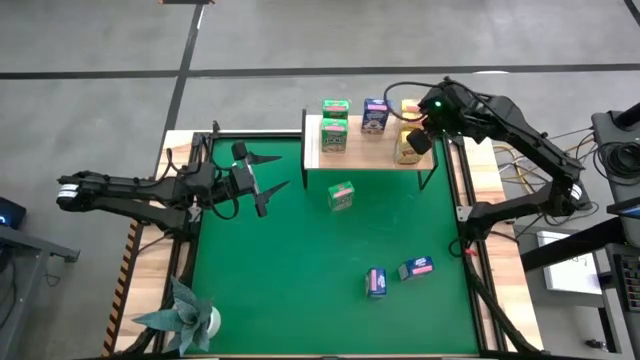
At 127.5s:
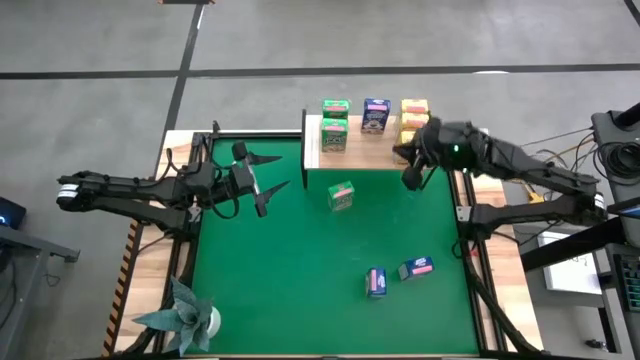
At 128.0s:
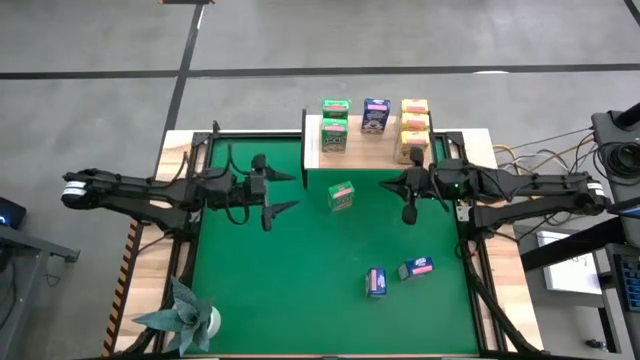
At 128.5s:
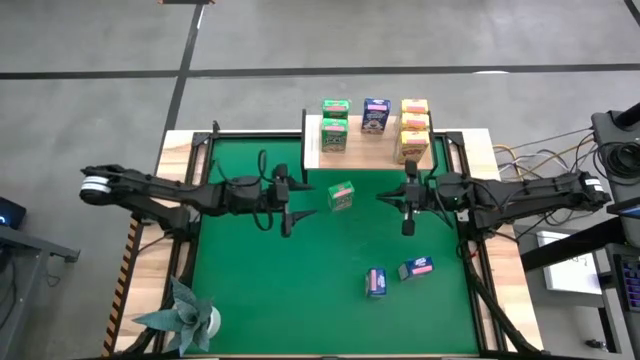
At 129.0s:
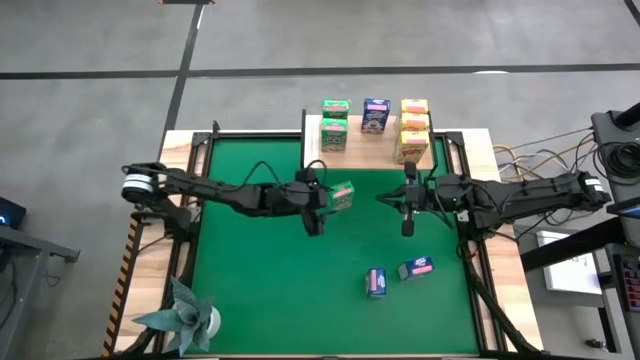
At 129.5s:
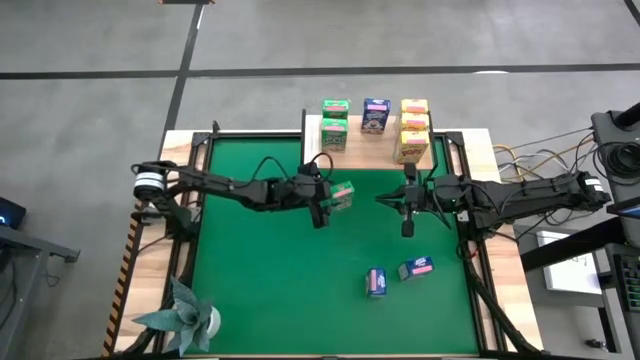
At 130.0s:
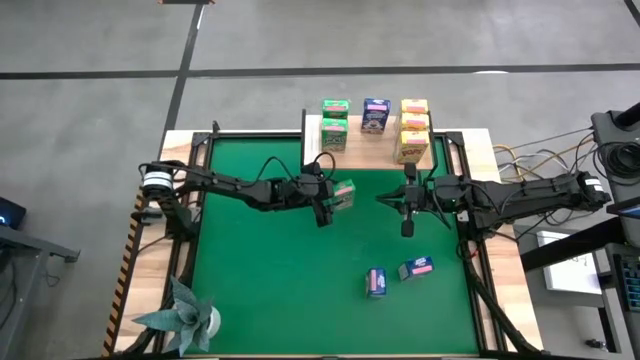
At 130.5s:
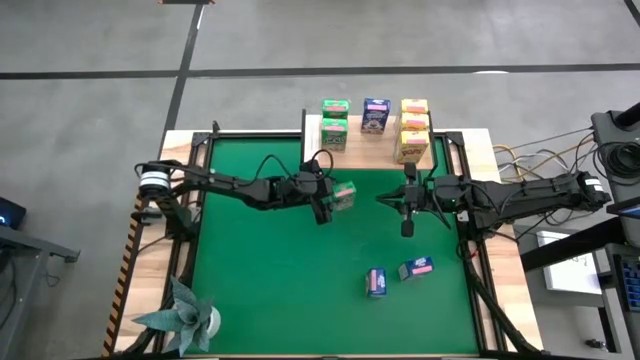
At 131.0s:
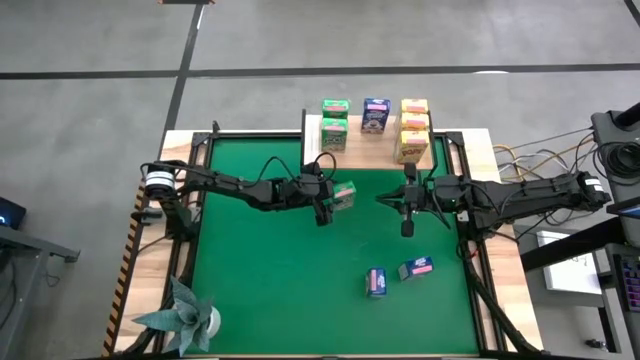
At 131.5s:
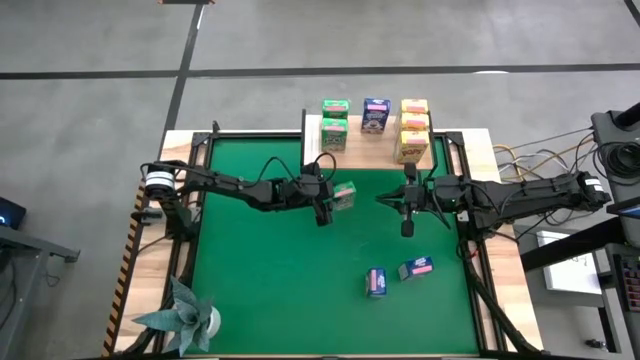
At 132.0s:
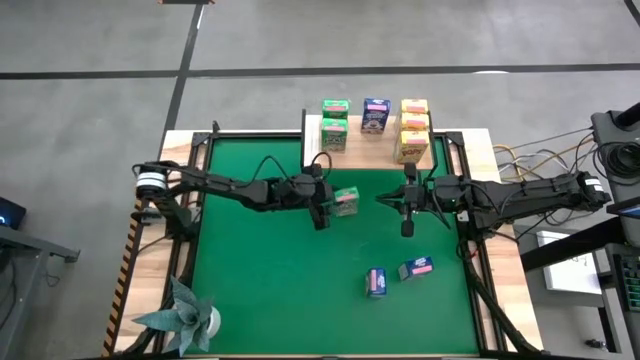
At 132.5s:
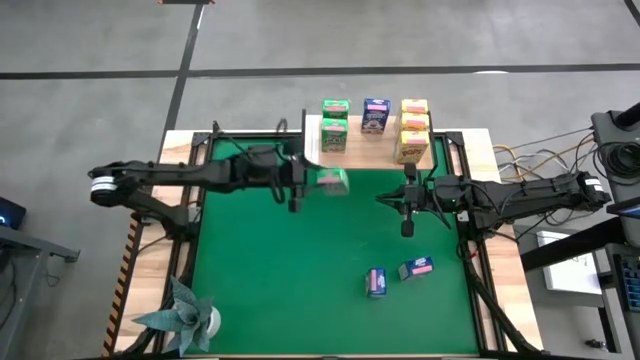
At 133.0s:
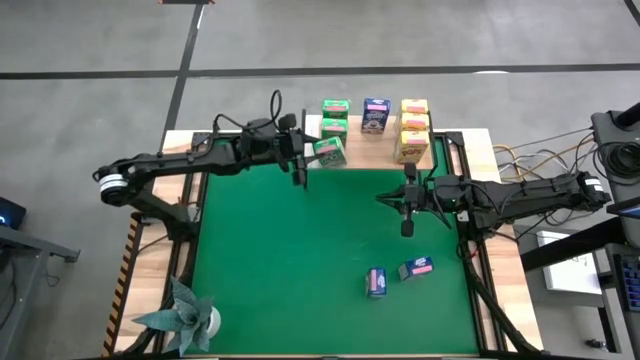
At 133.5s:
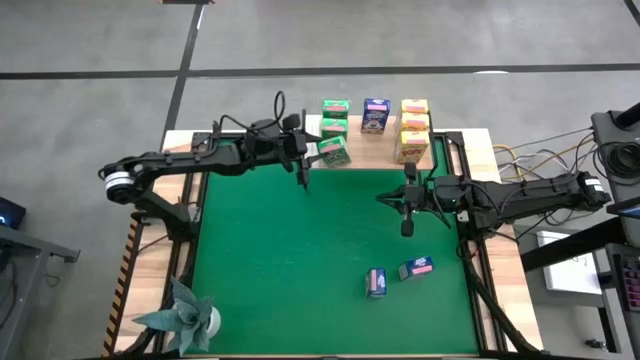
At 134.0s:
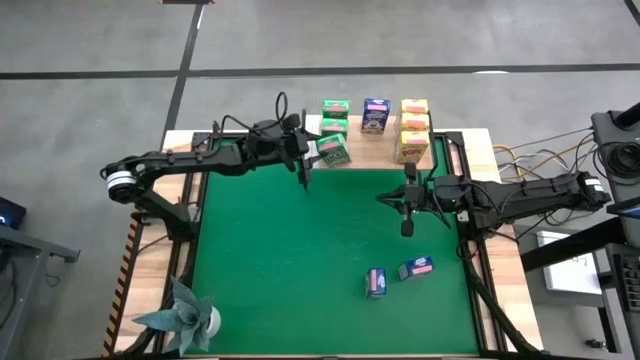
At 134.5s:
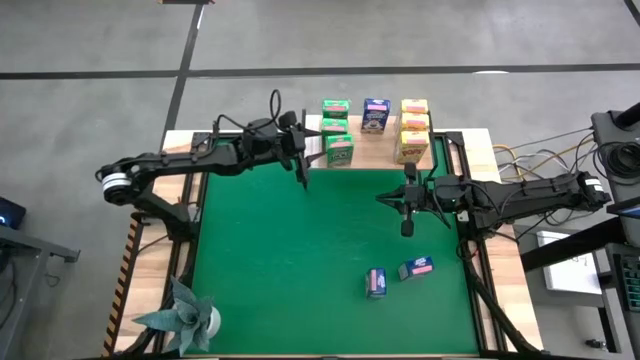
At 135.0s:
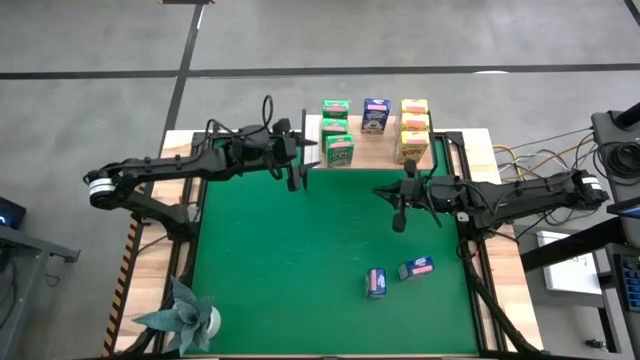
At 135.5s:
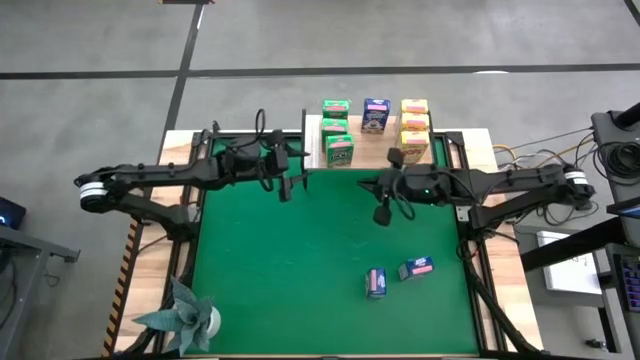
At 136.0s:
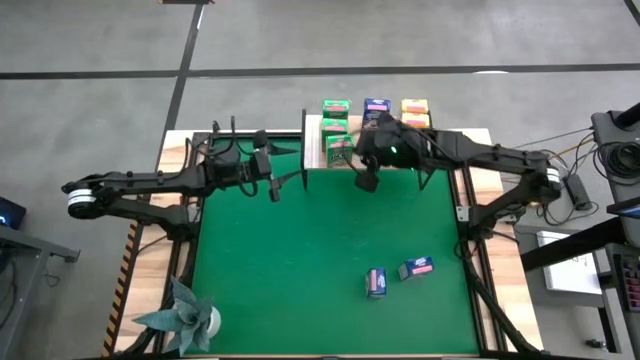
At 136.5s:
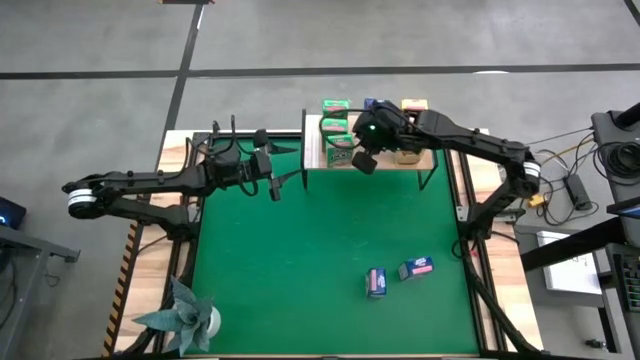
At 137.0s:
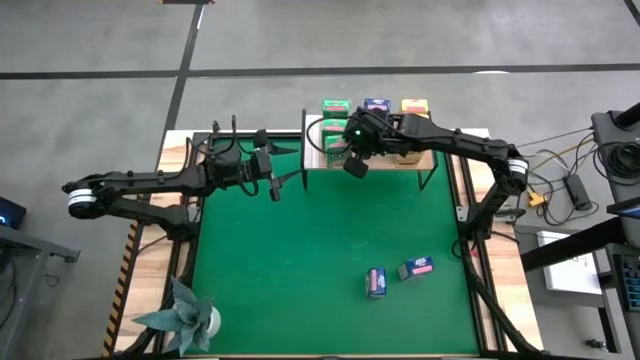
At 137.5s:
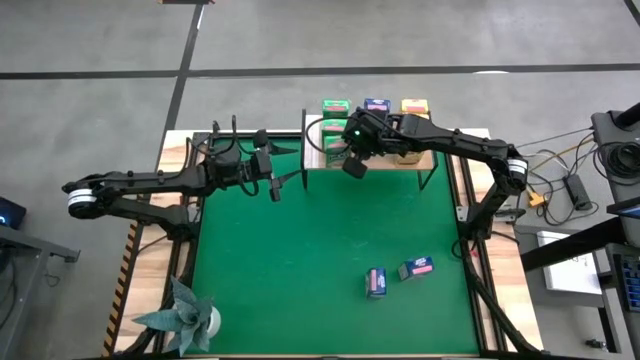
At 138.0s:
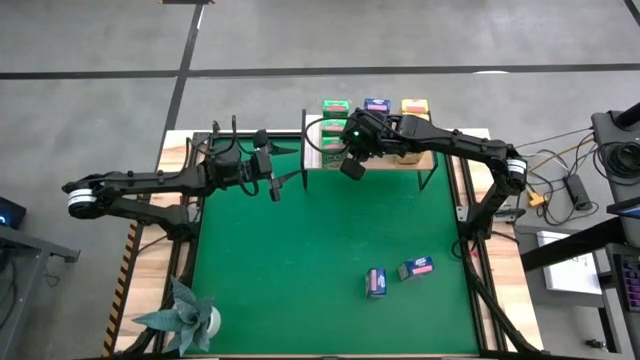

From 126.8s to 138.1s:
Task: Stack cereal on shelf
Put the green cereal box on the shelf aligned with the other green cereal box

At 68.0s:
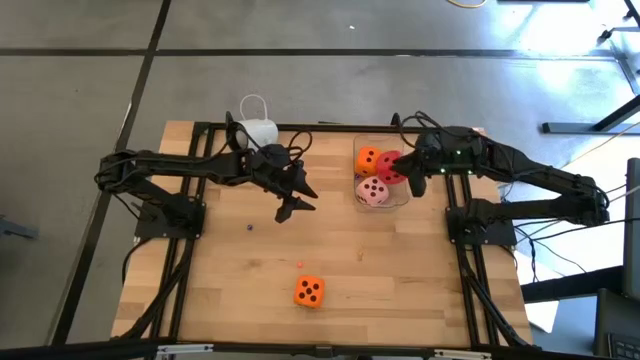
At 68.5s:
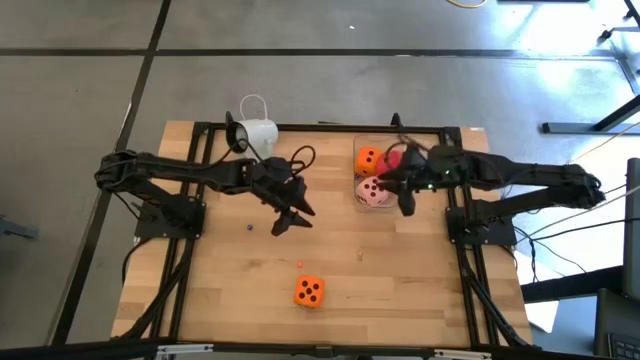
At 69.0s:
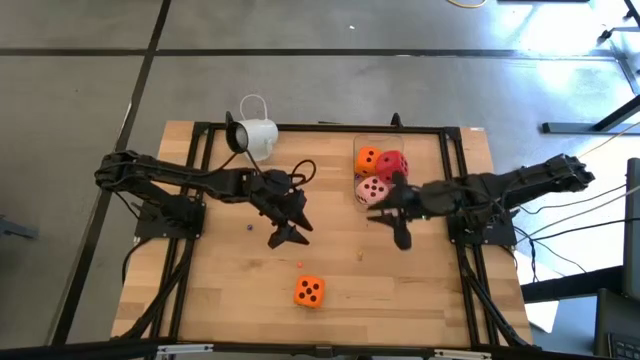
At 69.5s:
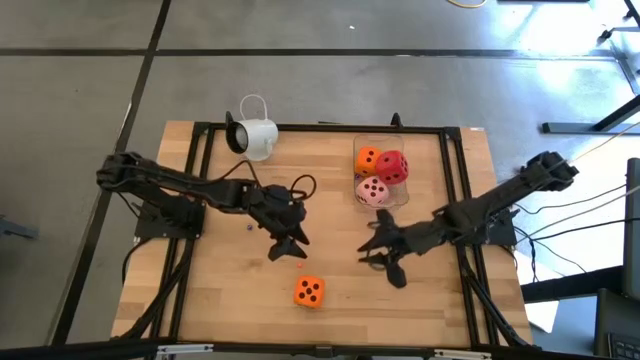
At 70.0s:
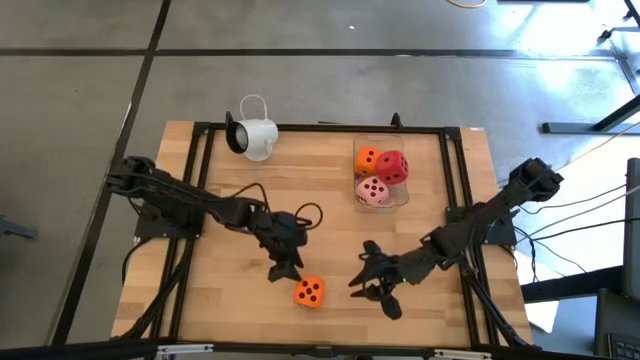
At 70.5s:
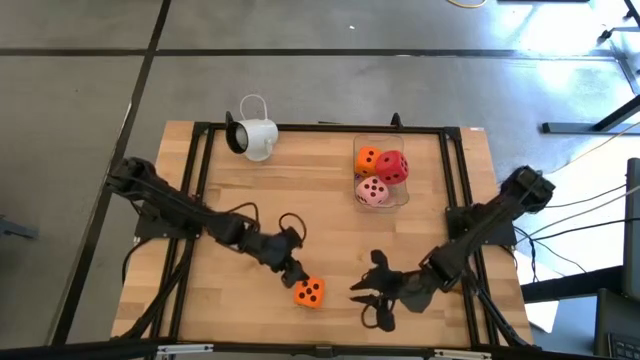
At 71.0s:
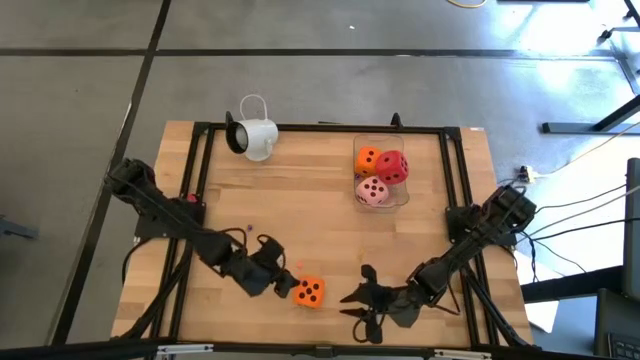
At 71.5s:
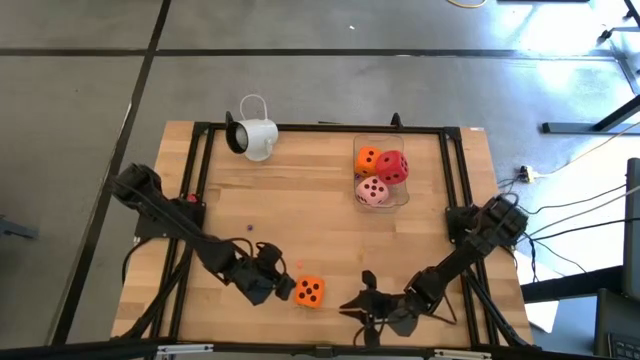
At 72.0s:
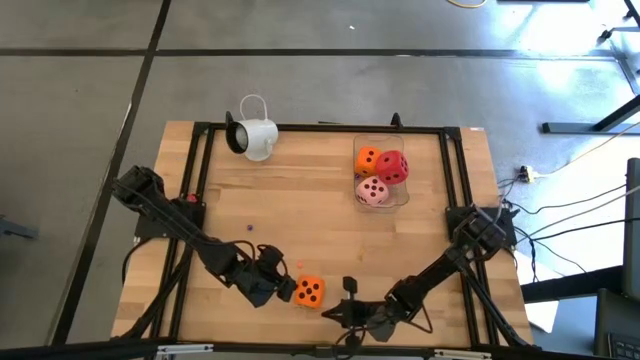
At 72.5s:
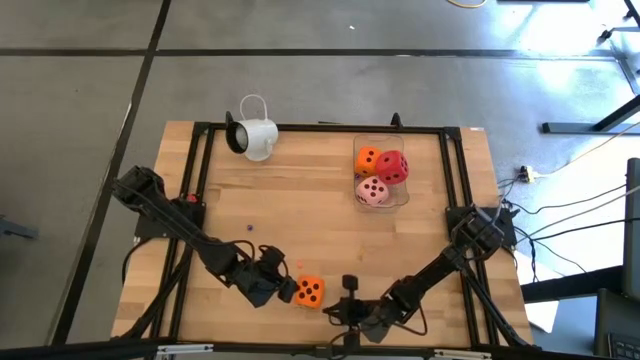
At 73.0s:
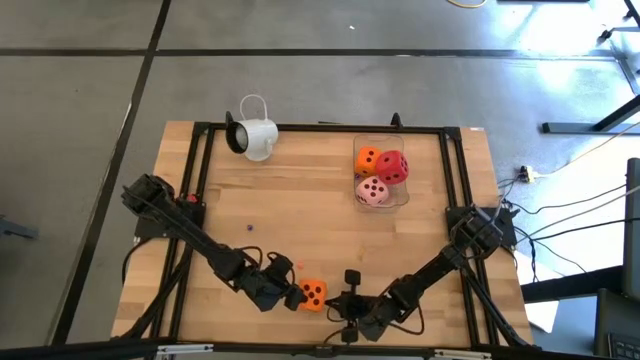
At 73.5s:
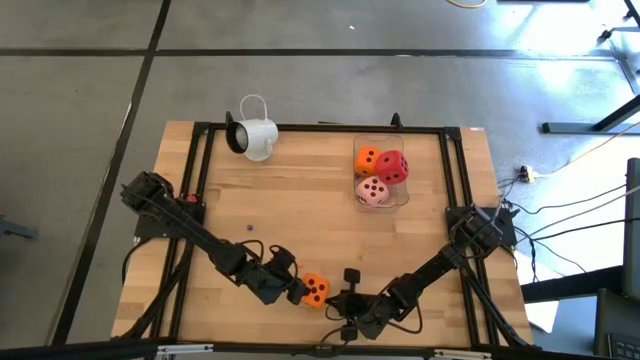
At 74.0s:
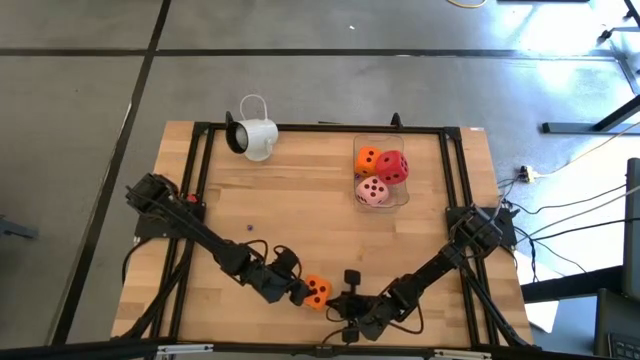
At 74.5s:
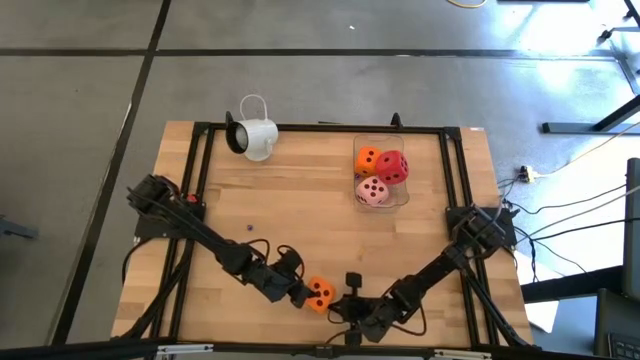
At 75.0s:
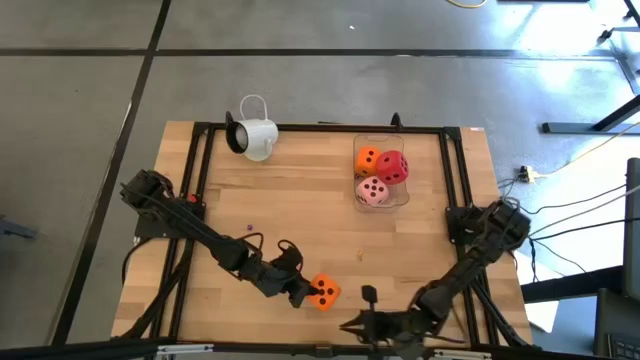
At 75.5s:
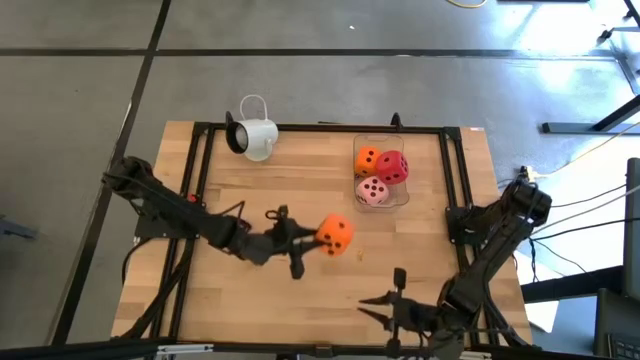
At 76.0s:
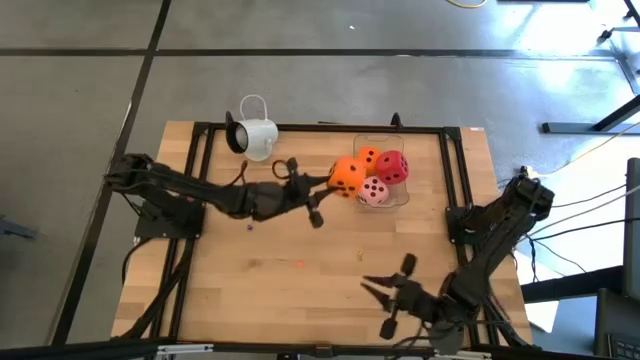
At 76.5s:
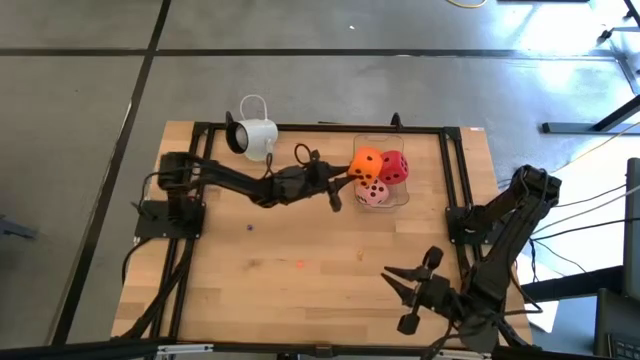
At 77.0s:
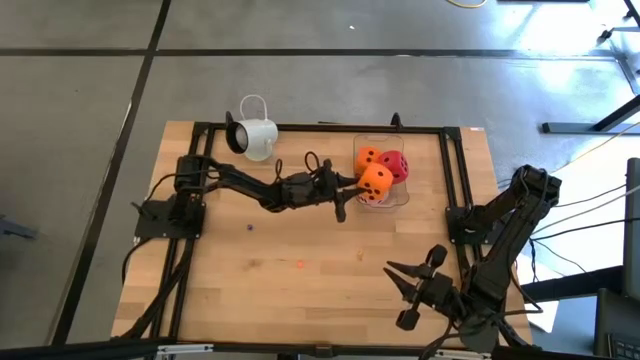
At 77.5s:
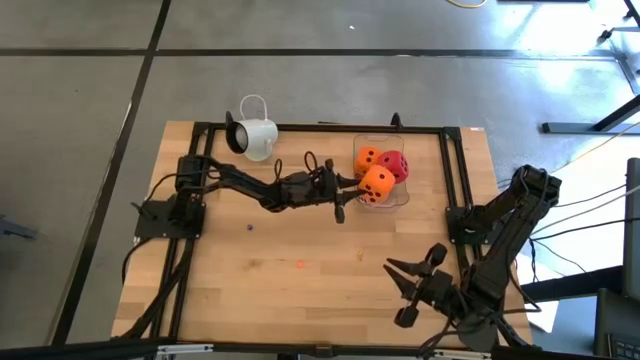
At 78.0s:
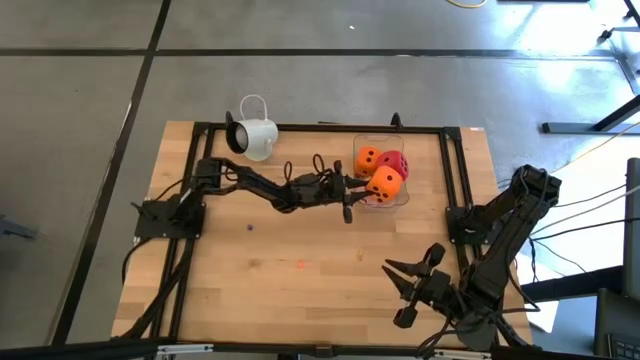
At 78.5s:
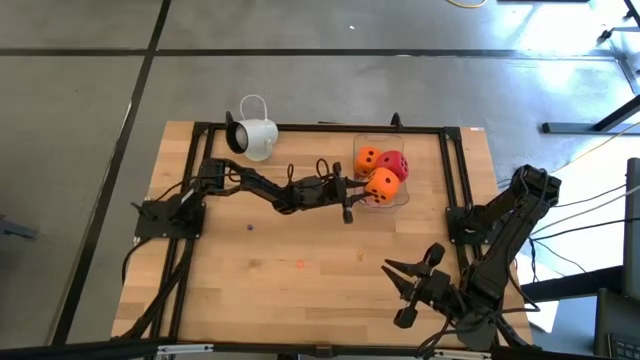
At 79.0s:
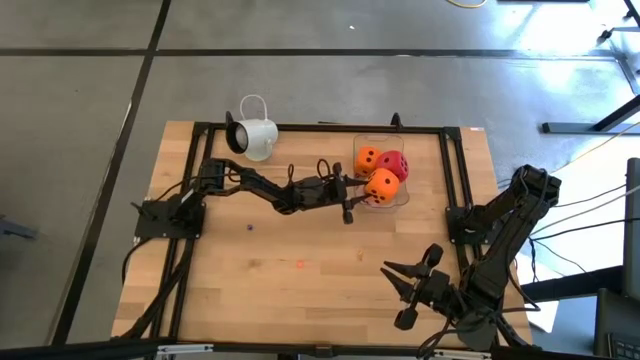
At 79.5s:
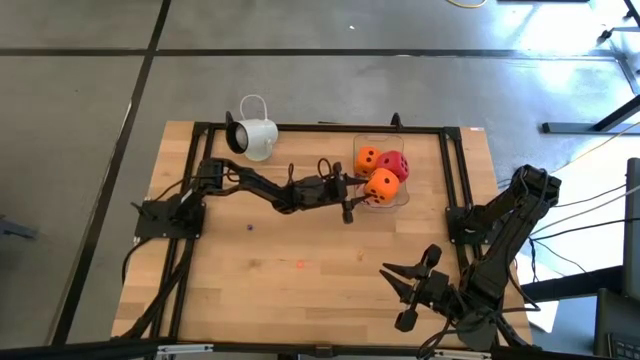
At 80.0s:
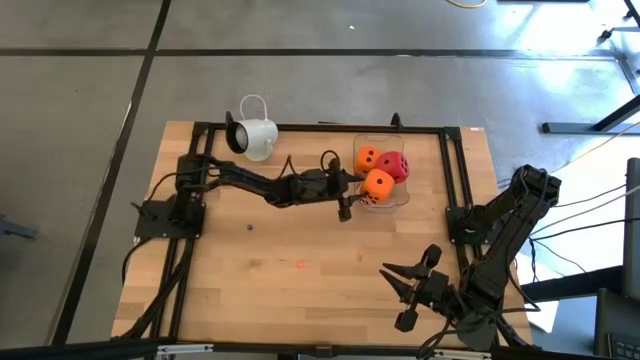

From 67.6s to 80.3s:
Task: Pick & Place Dice
Put the large orange die into the transparent bin
